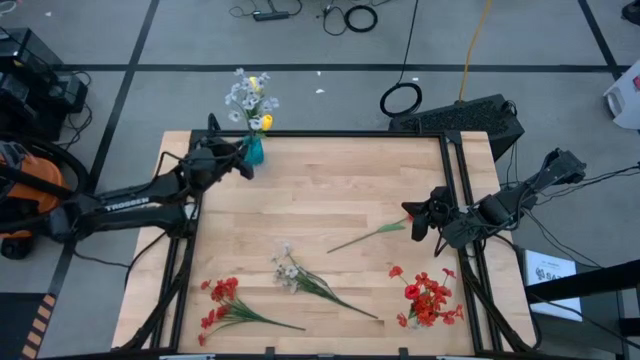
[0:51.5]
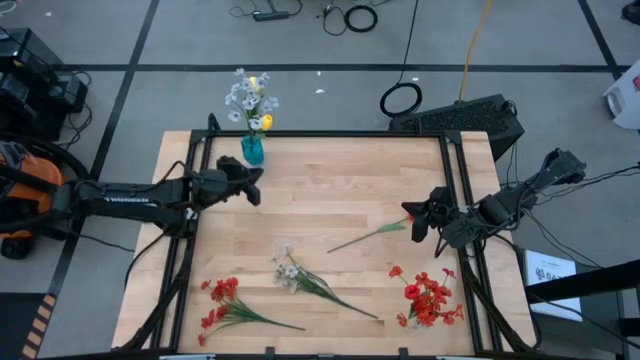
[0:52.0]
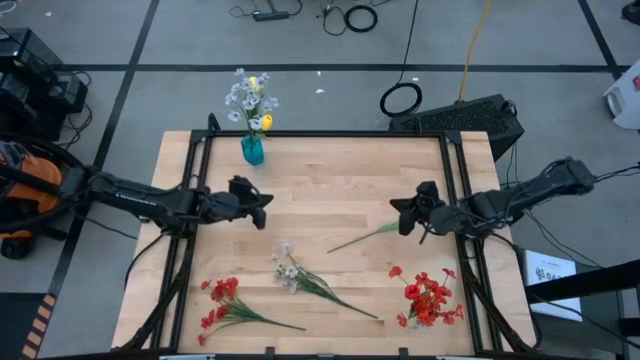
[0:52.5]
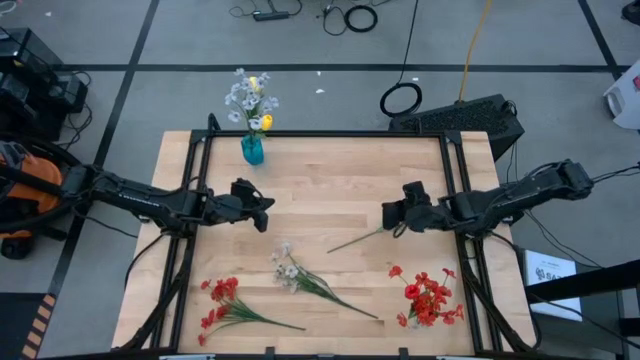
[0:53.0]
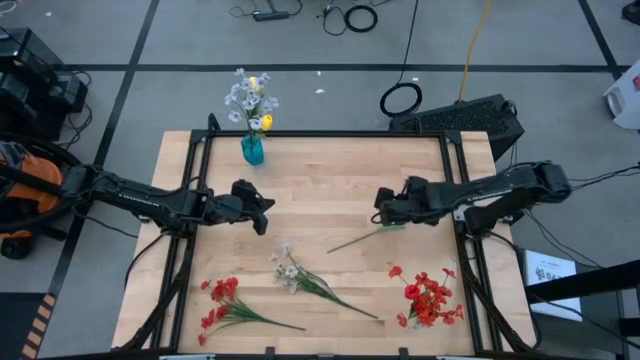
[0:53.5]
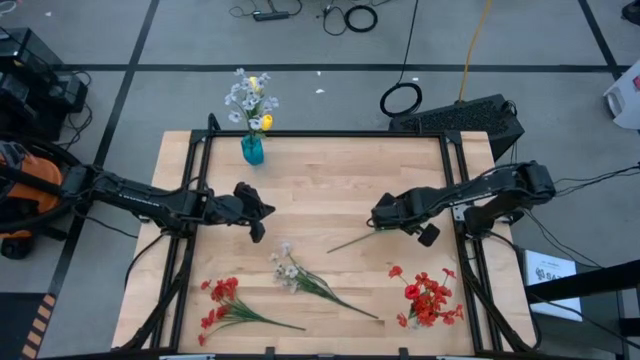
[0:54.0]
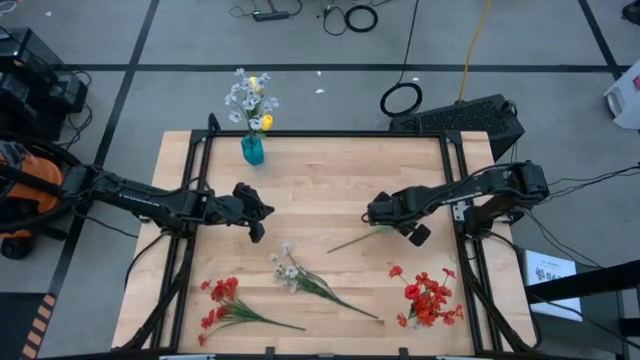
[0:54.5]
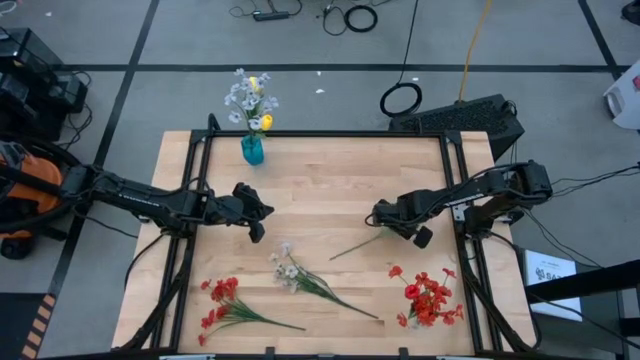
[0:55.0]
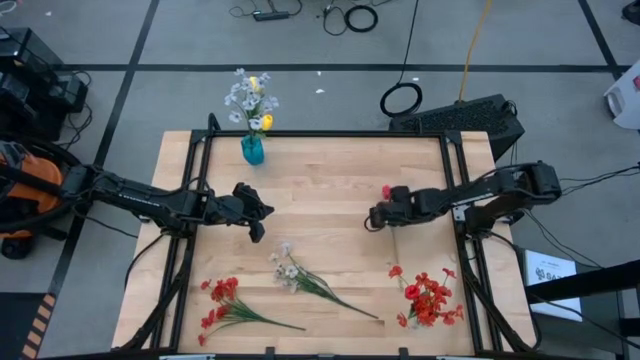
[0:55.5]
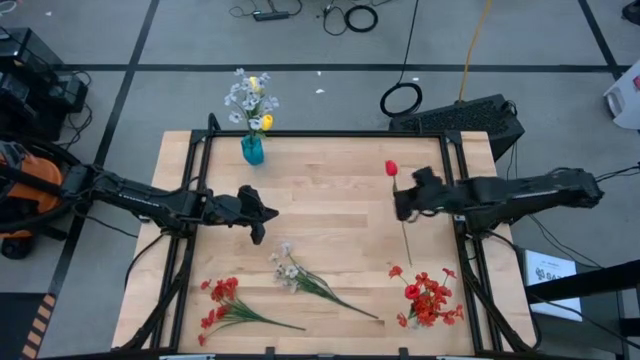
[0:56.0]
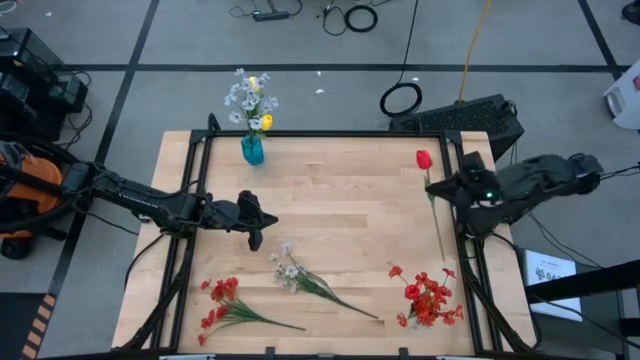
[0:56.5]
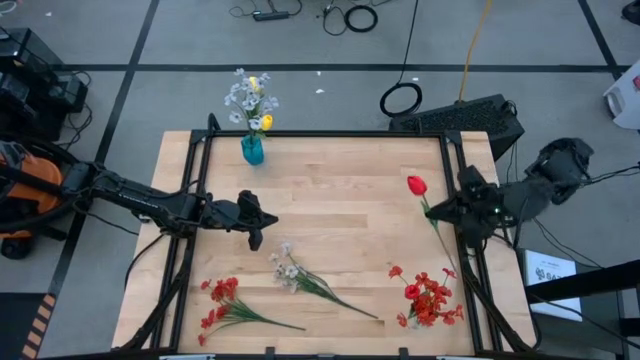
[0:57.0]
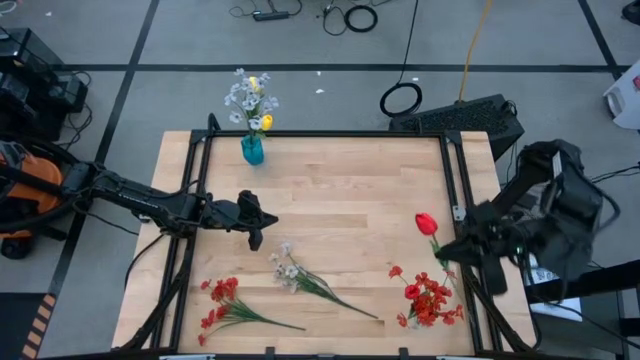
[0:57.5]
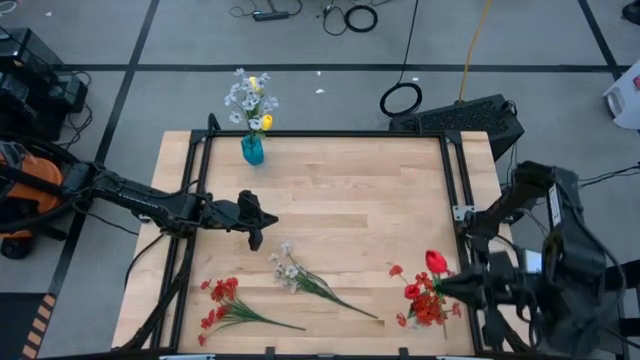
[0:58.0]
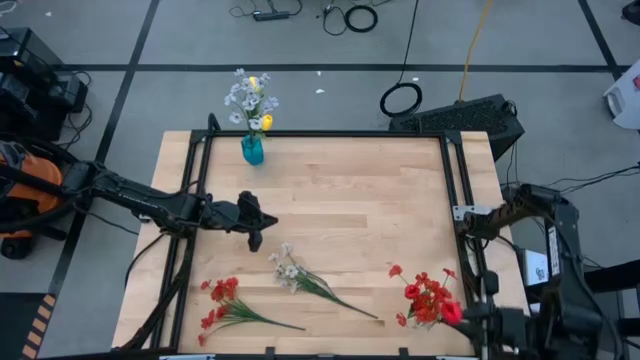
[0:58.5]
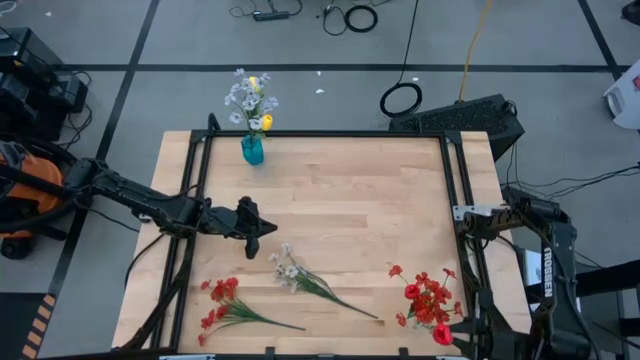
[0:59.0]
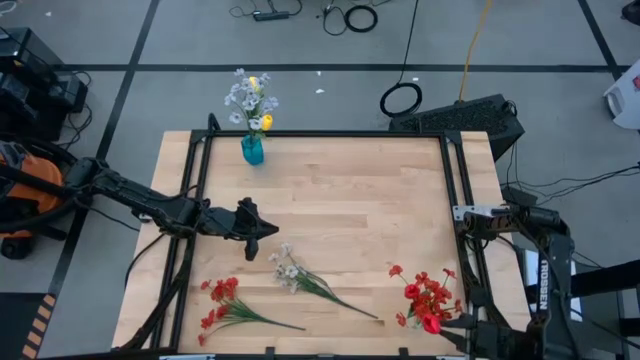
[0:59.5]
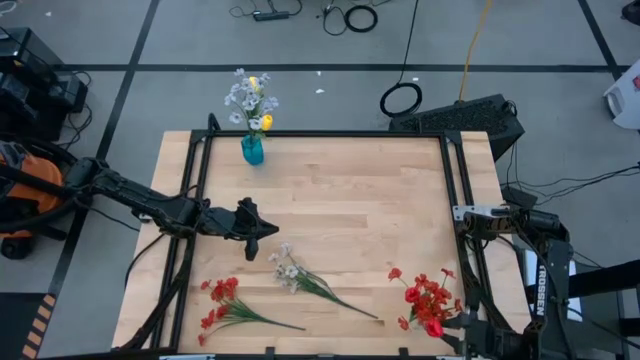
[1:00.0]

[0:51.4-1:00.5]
Task: Sort flowers into vase by color
Put the red tulip into the transparent vase

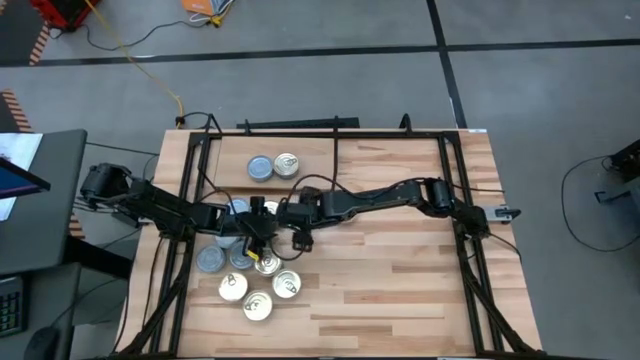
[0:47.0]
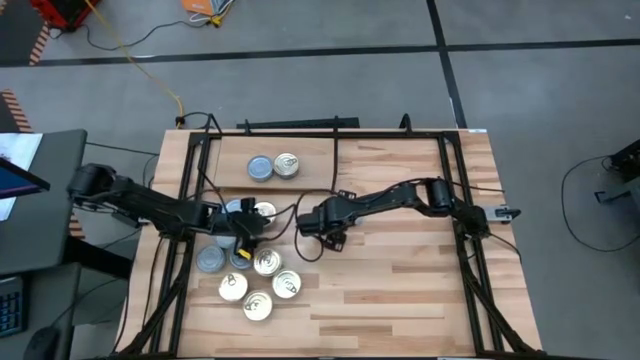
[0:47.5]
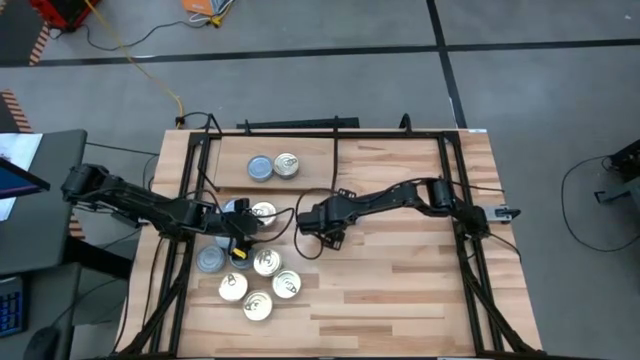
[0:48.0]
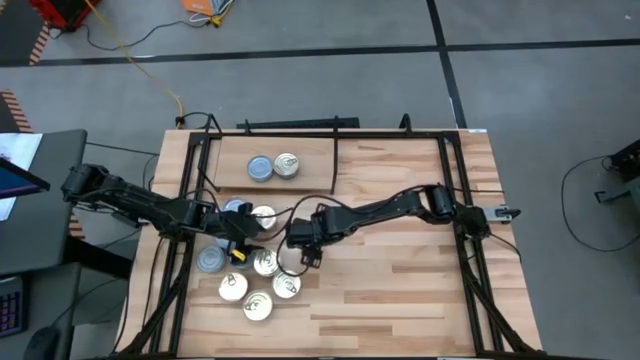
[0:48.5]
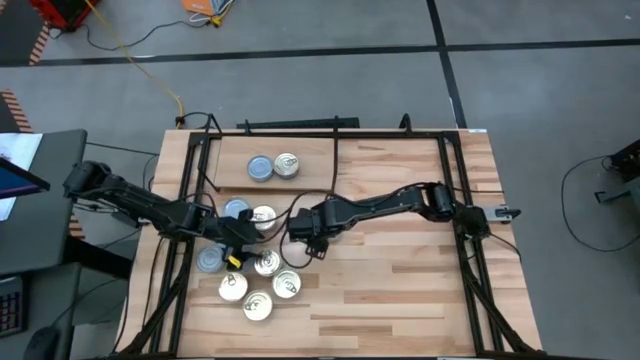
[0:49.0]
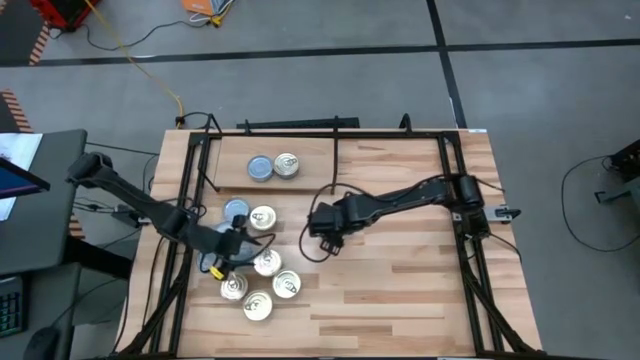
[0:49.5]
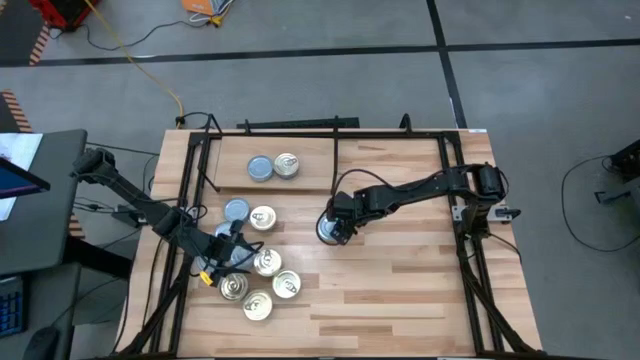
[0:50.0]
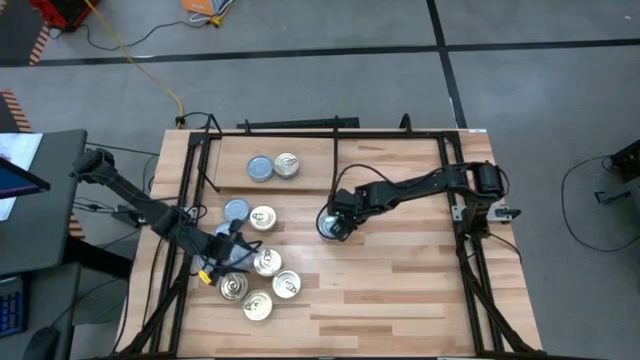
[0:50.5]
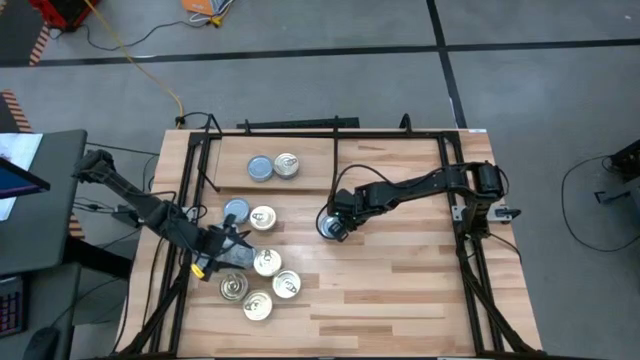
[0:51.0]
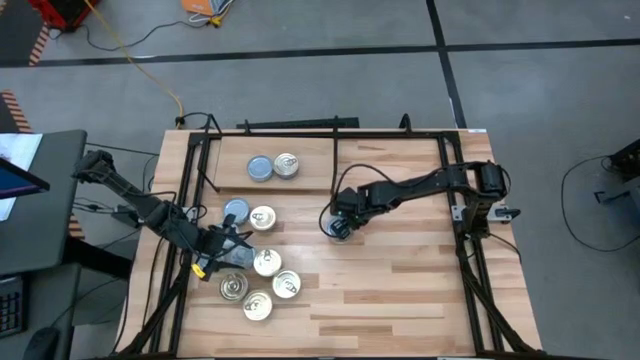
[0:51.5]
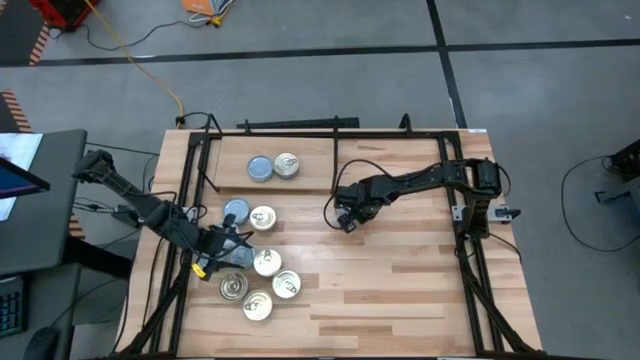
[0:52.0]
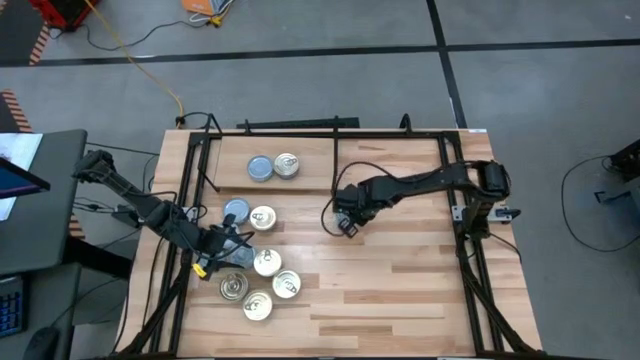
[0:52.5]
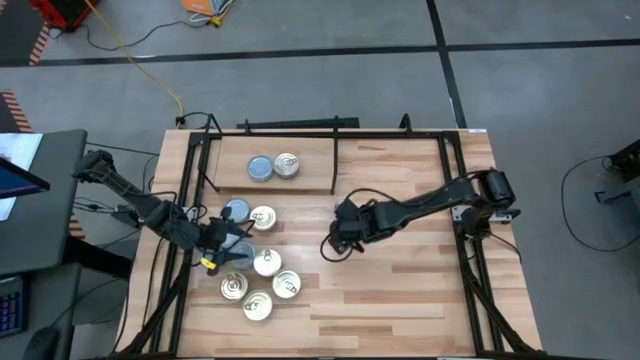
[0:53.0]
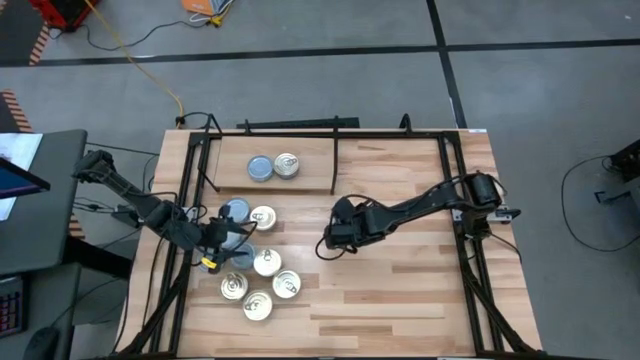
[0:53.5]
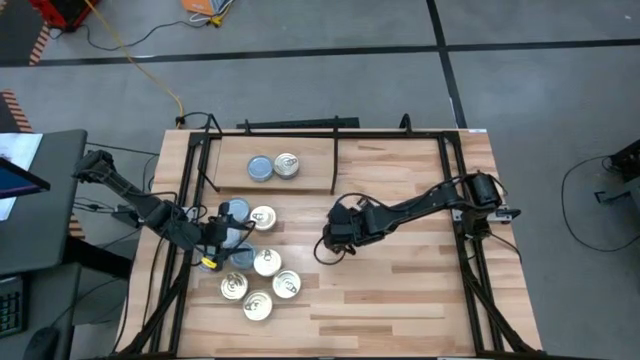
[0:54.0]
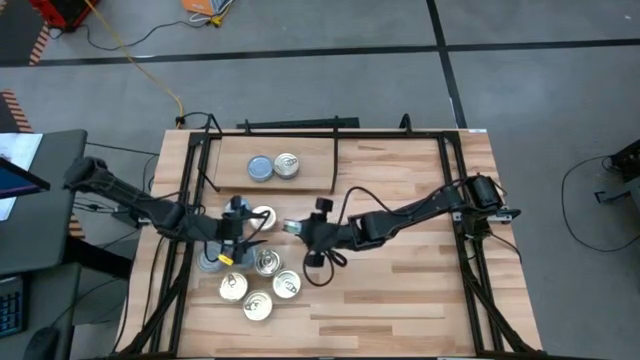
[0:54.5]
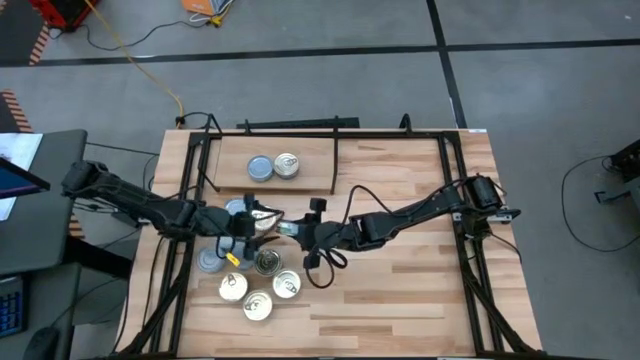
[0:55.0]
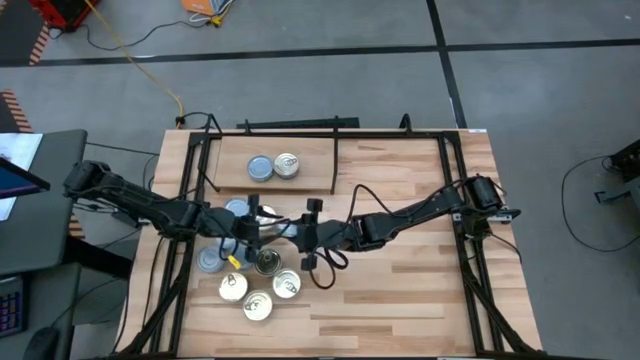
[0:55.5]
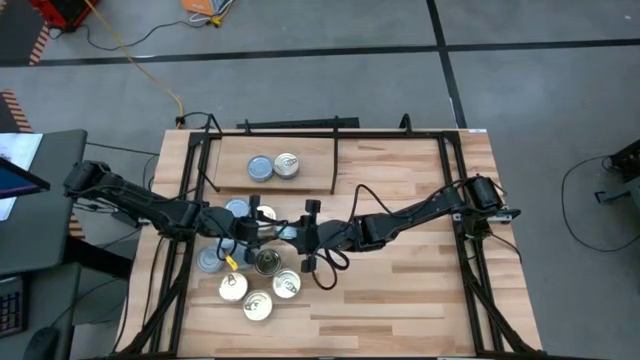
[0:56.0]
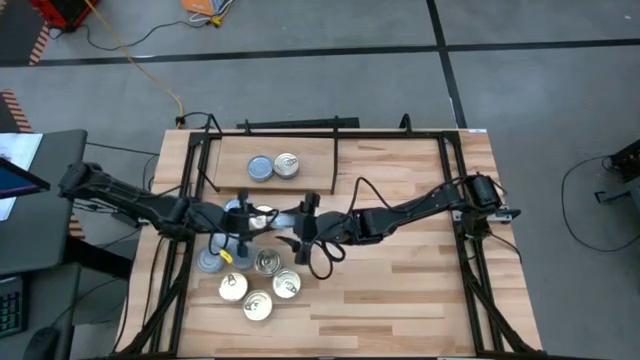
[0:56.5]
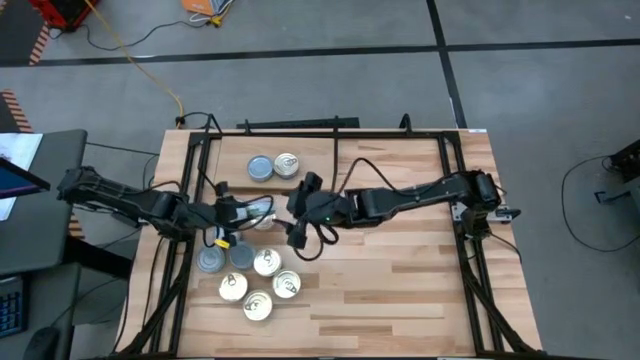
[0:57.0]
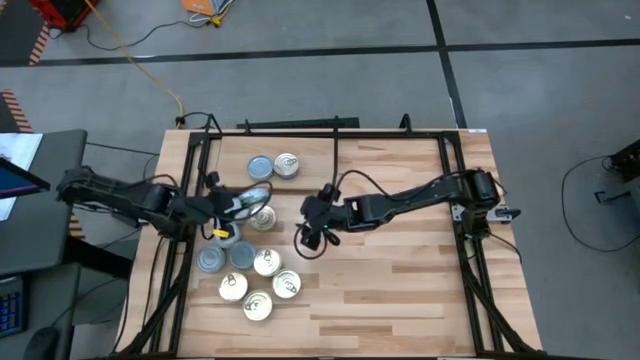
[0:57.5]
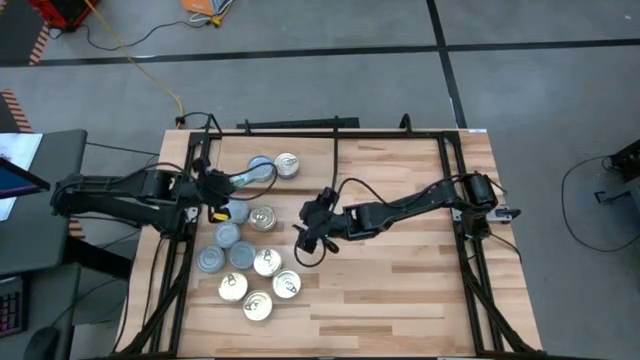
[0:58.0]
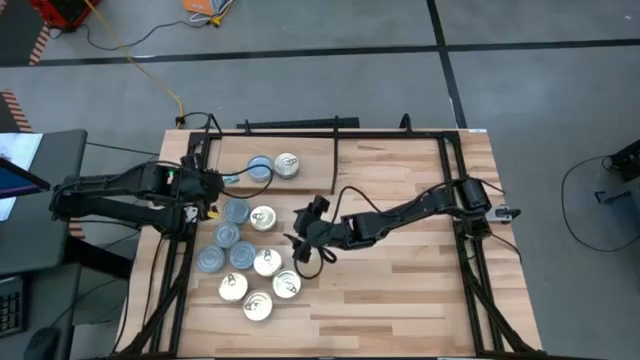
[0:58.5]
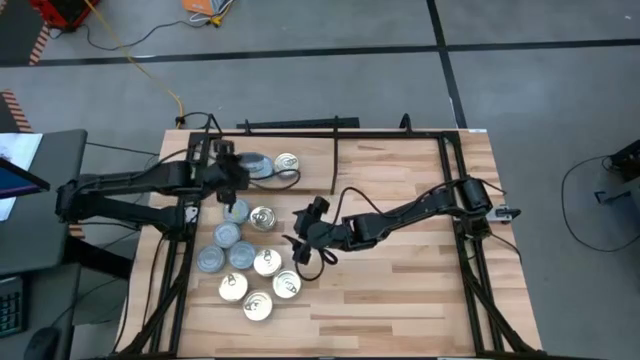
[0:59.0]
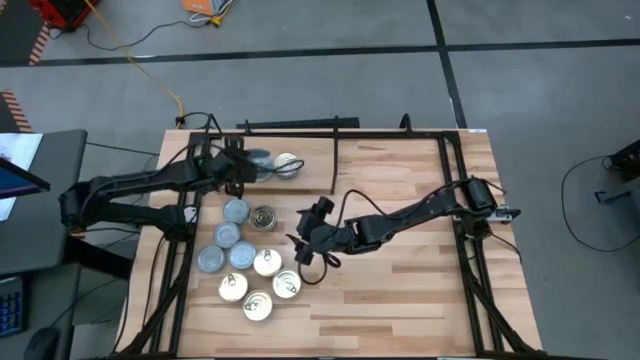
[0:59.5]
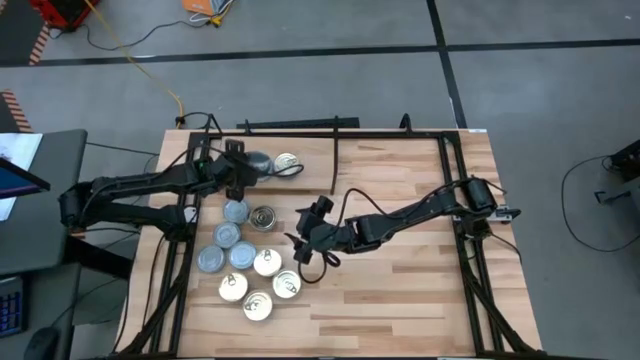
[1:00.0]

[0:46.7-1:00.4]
Task: Stack canned seafood by type on shelf
Stack the green tuna can on top of the green tuna can on the shelf
